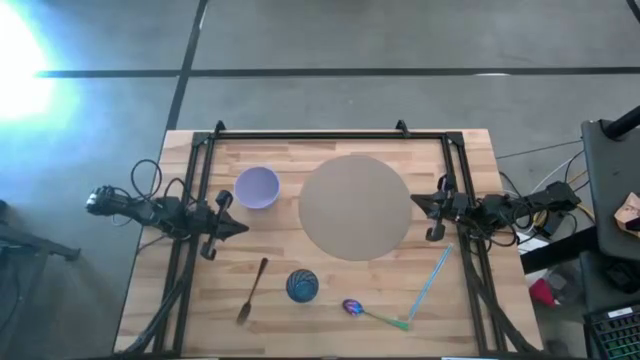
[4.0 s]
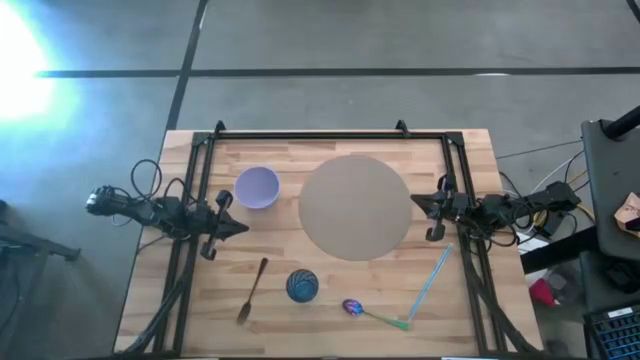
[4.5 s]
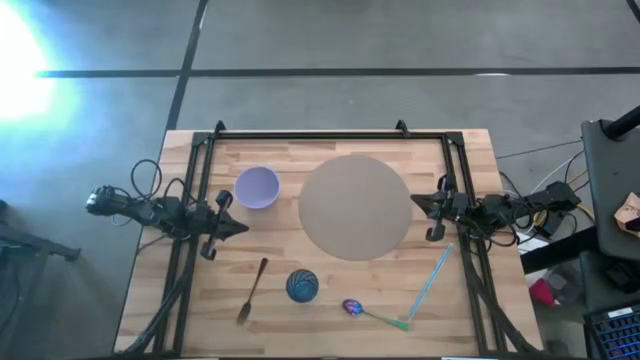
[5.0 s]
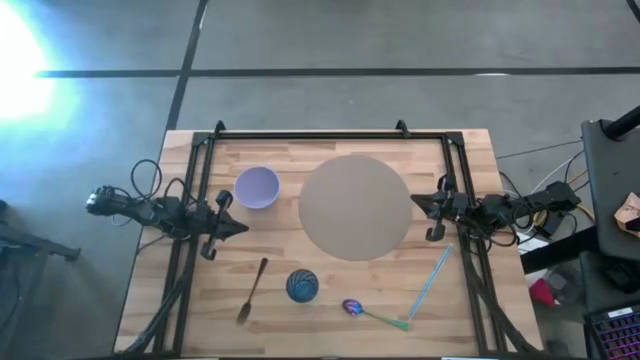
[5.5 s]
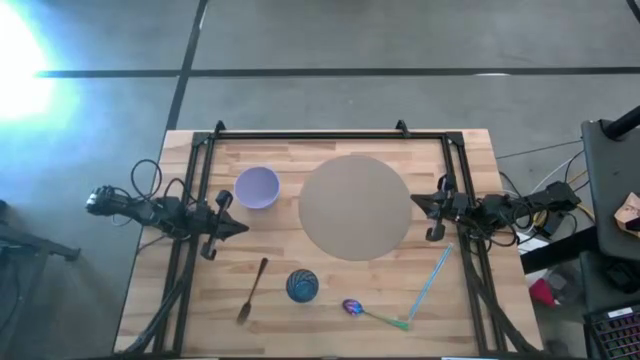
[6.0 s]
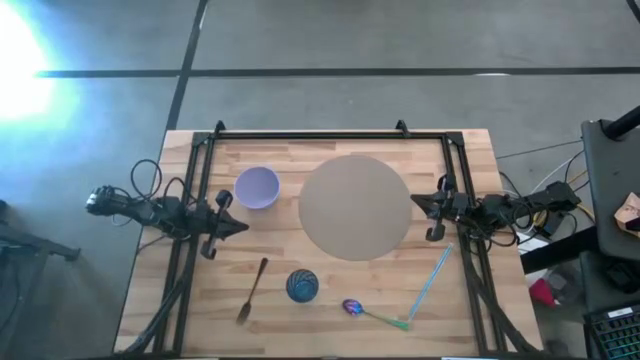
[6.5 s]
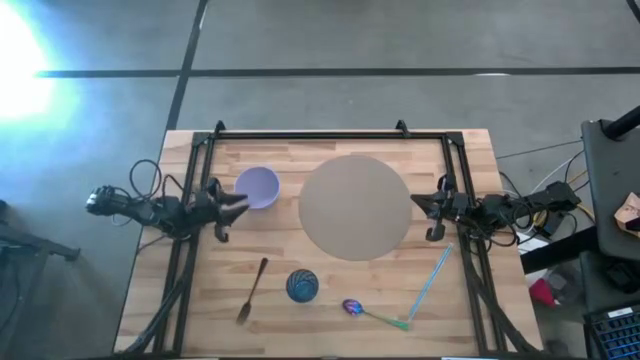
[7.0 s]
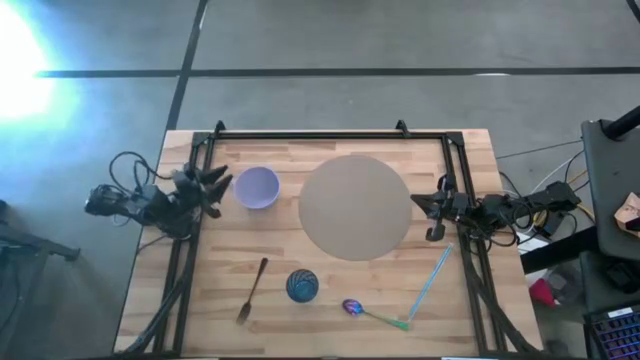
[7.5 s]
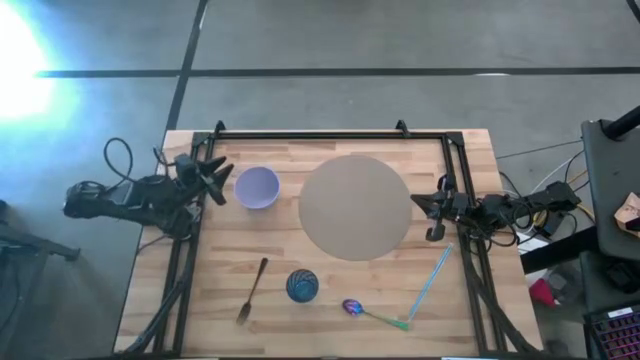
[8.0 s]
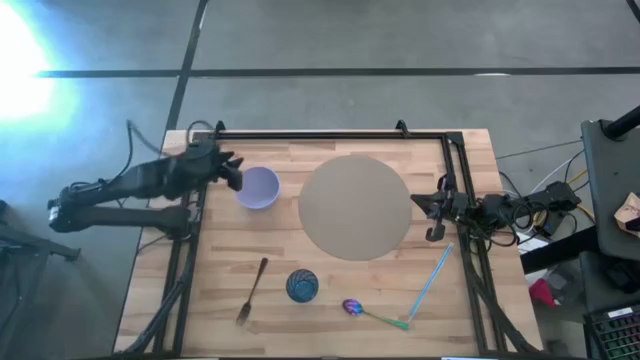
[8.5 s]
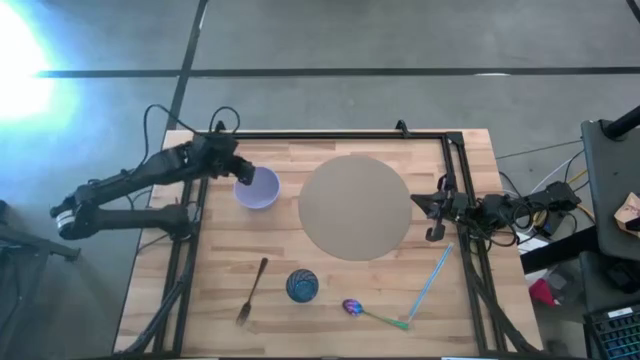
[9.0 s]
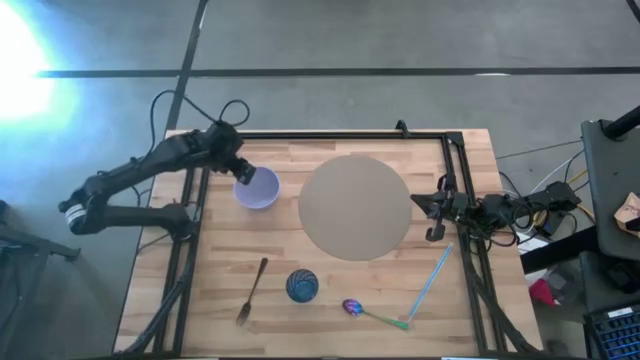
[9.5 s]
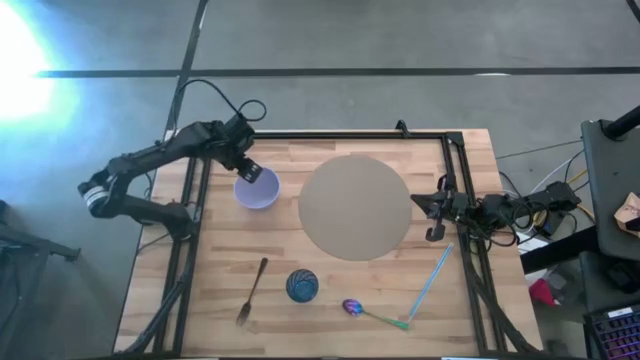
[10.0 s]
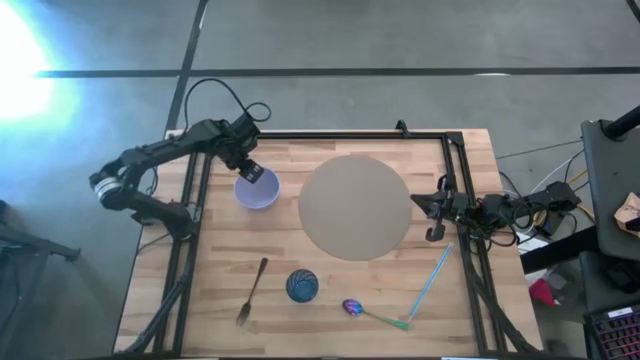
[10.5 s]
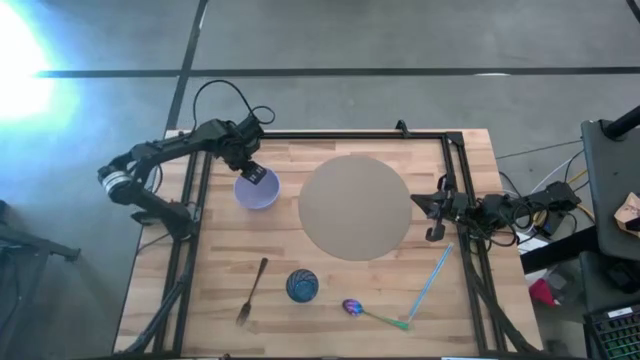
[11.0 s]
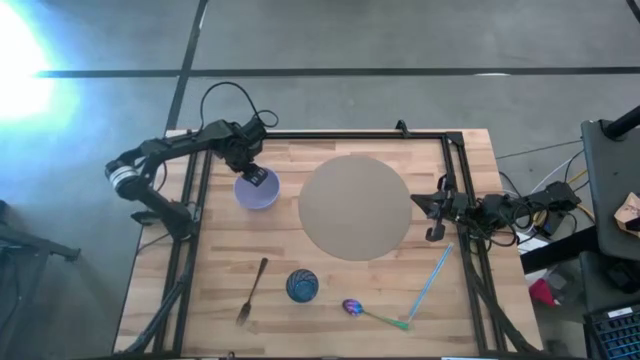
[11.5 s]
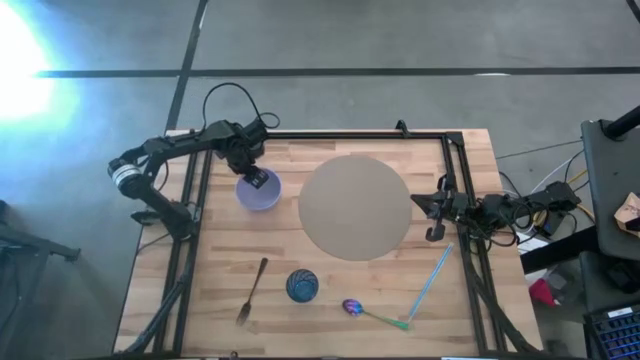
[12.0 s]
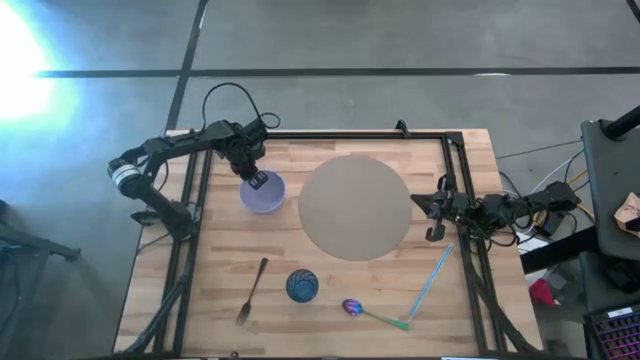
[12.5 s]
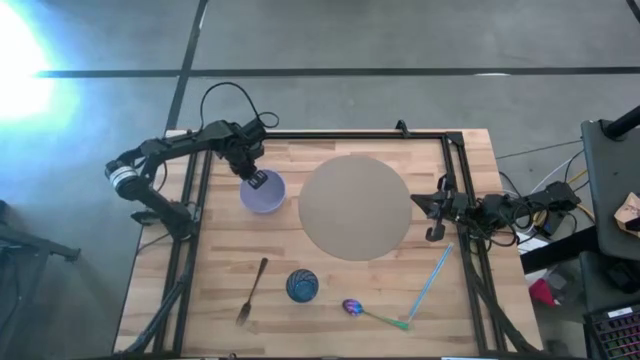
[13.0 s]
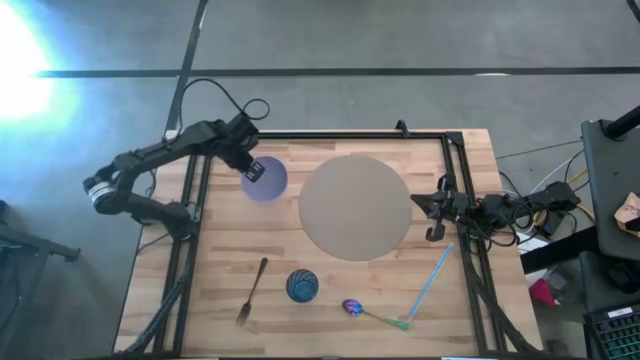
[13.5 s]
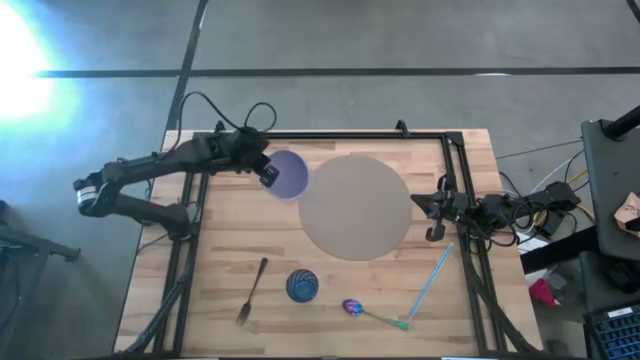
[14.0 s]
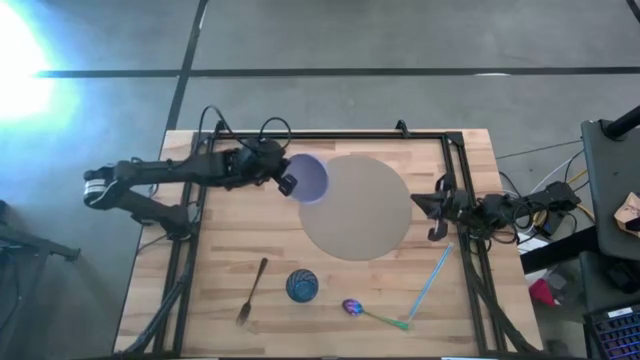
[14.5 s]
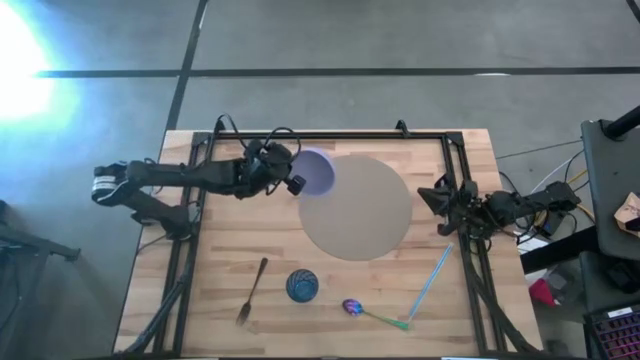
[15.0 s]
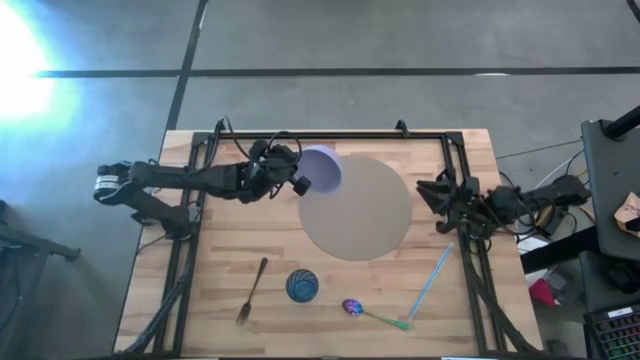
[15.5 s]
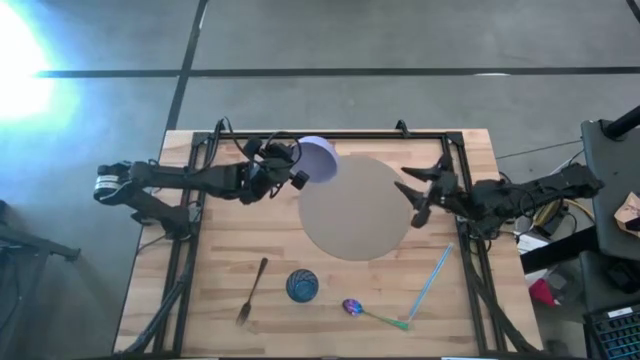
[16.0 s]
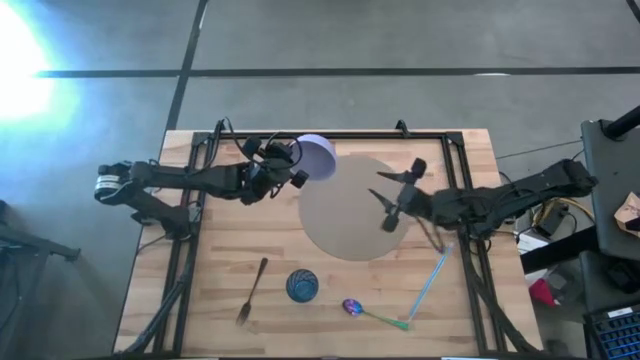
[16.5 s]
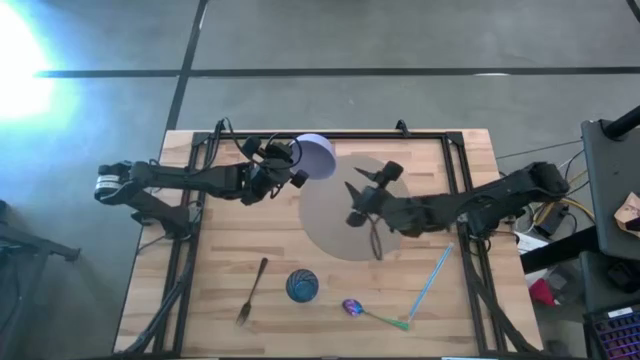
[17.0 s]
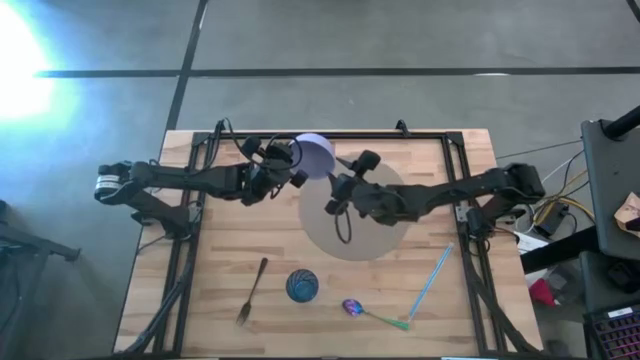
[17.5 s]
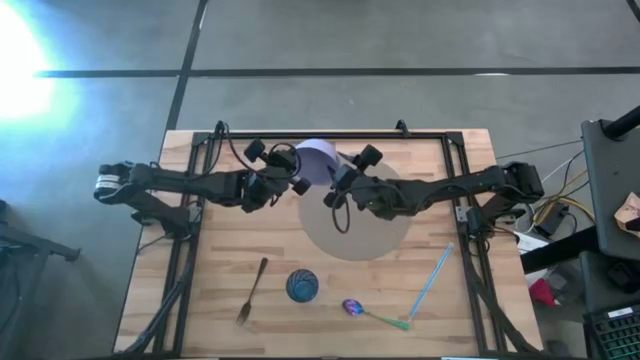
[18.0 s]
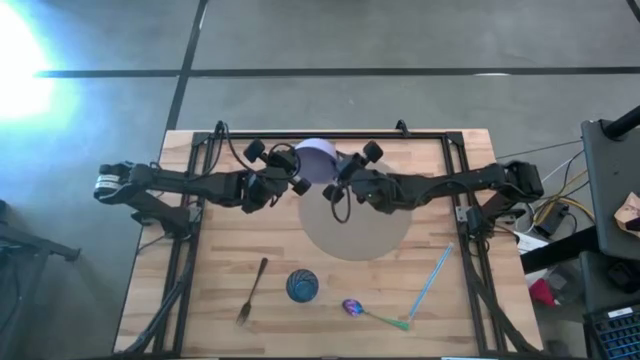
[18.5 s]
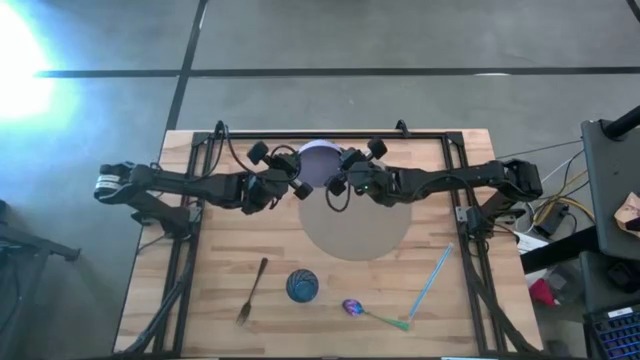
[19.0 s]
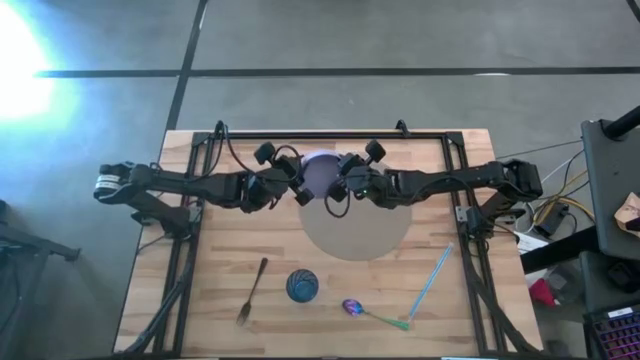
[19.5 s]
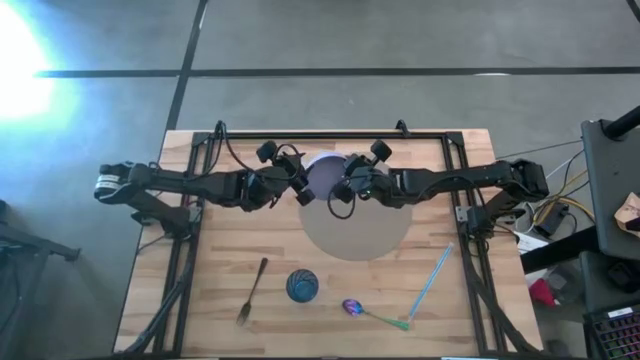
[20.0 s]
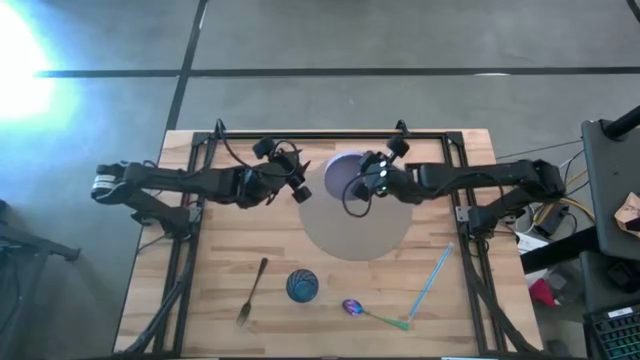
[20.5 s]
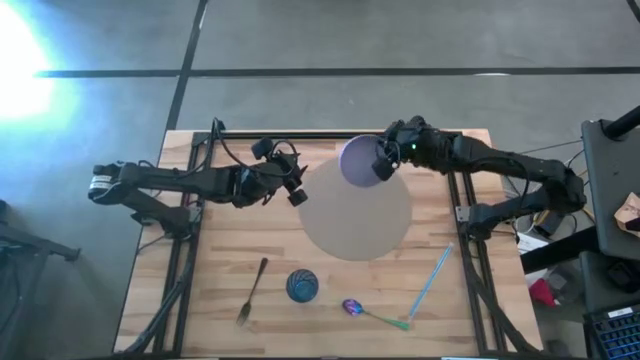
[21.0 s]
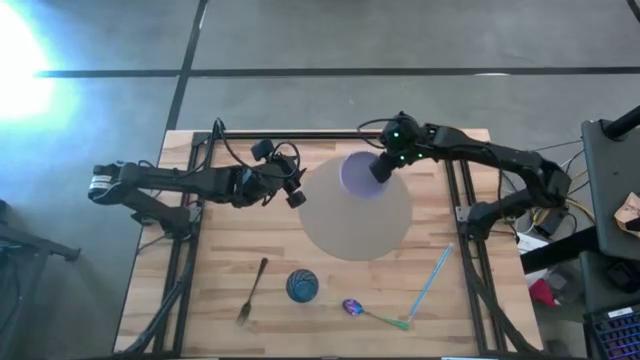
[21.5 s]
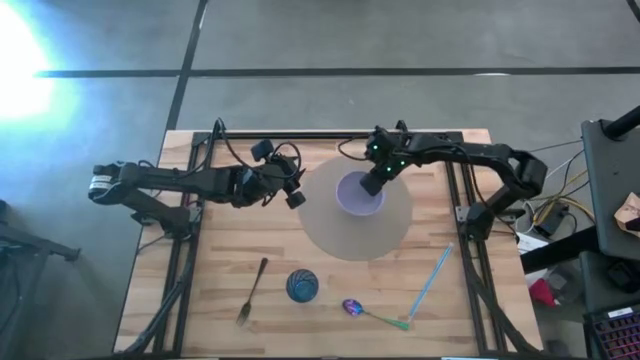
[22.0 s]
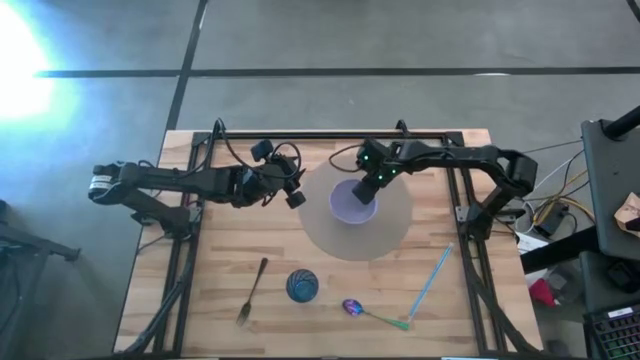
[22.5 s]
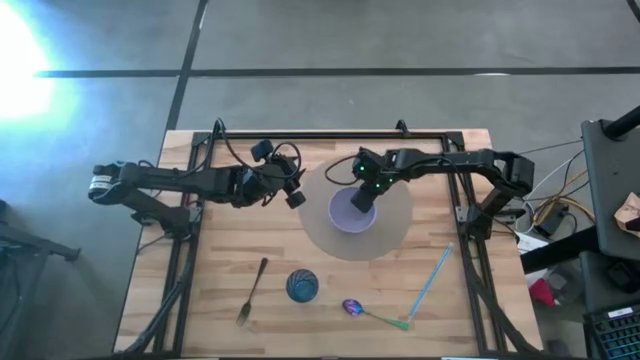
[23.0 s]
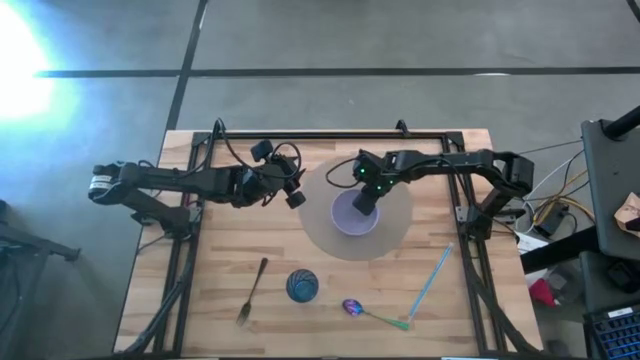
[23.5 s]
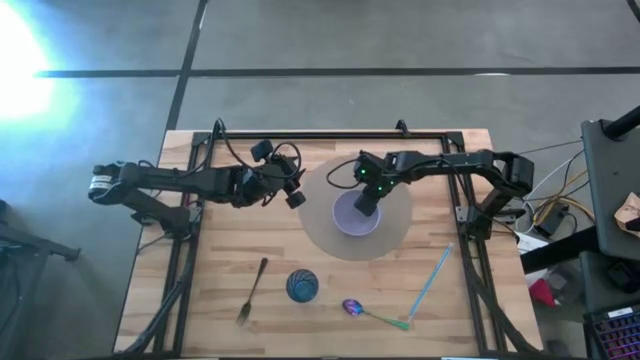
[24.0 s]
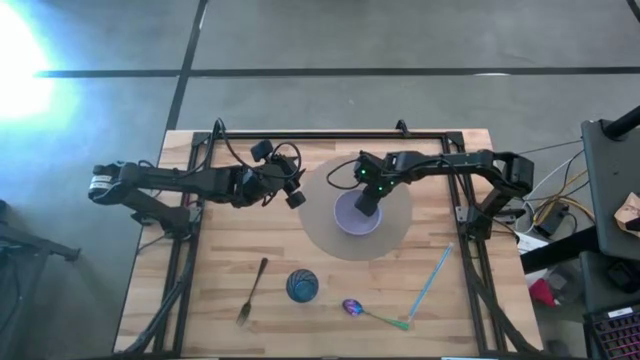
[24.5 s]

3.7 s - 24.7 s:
Task: Pick & Place Utensil
Put the purple bowl on the placemat
